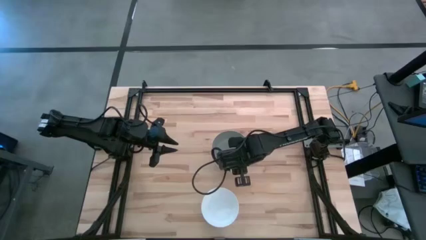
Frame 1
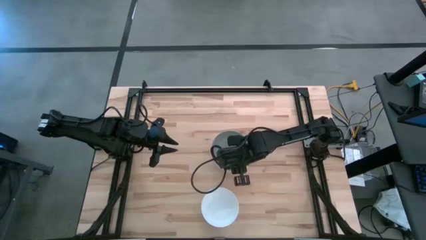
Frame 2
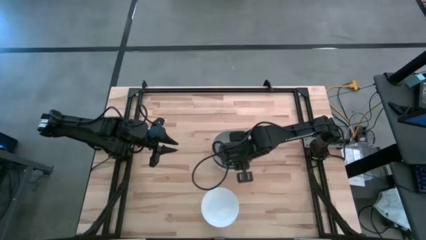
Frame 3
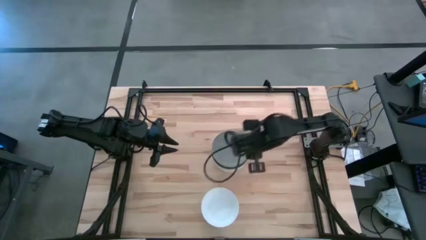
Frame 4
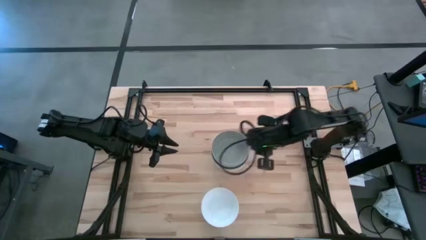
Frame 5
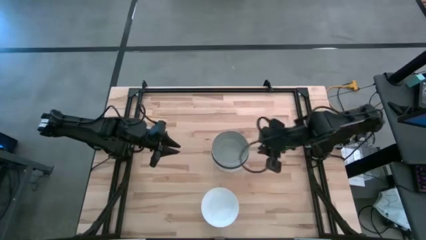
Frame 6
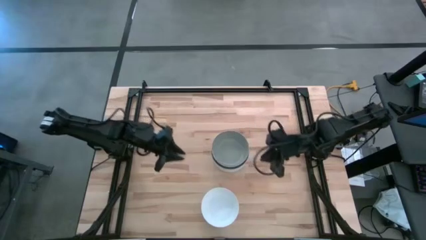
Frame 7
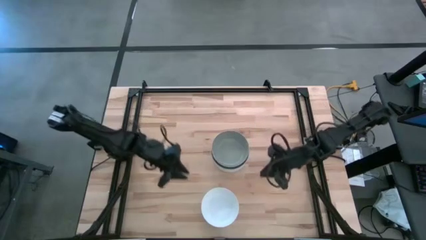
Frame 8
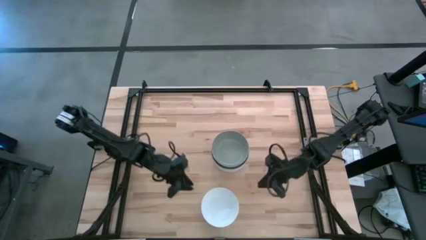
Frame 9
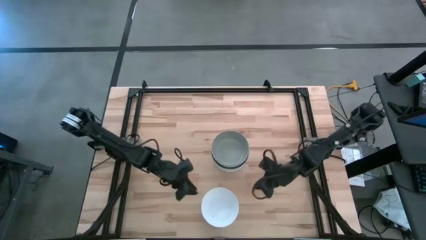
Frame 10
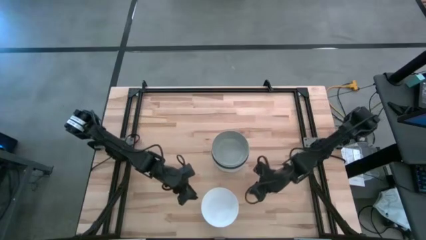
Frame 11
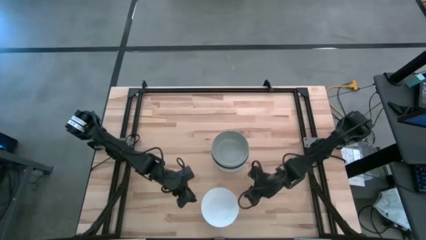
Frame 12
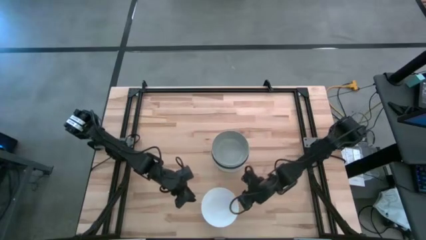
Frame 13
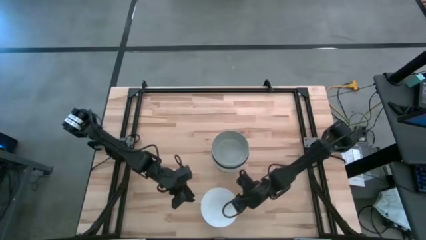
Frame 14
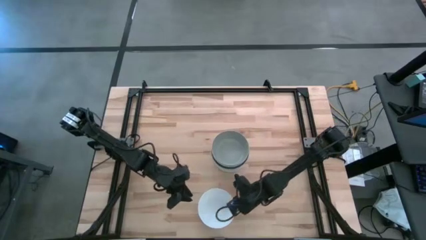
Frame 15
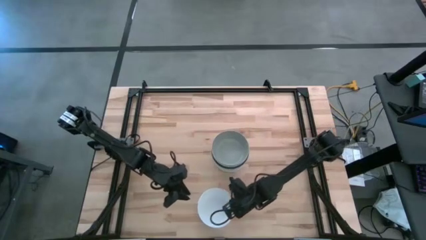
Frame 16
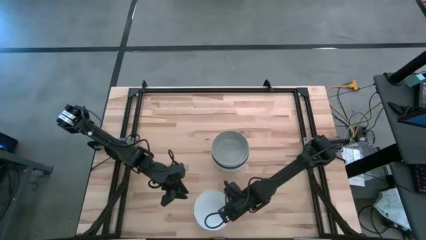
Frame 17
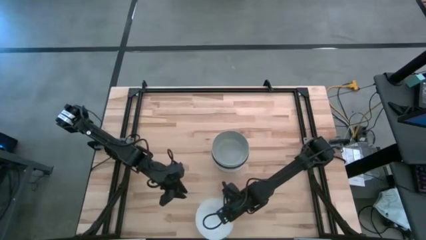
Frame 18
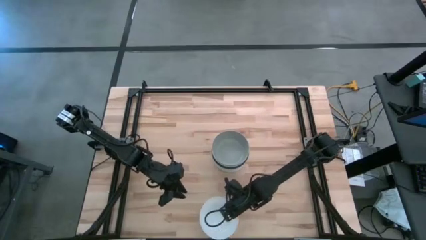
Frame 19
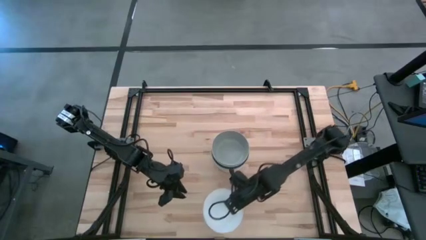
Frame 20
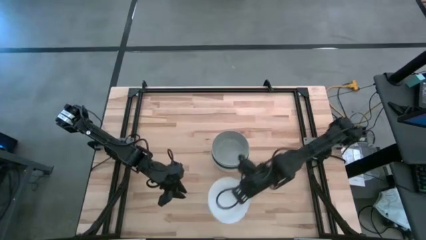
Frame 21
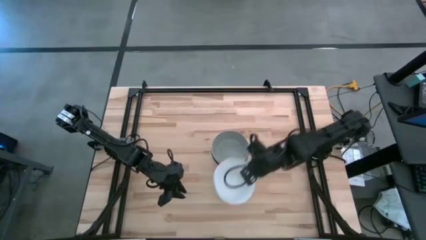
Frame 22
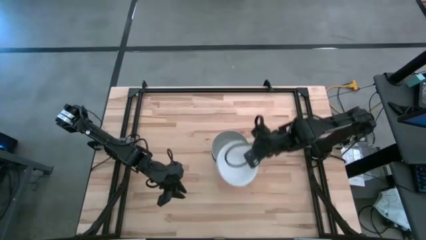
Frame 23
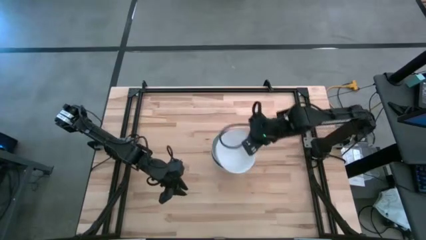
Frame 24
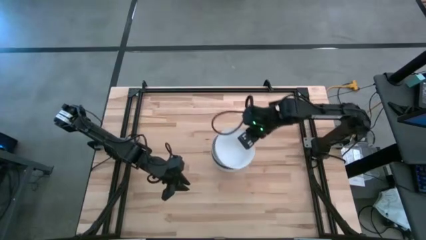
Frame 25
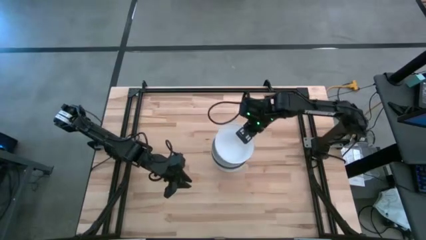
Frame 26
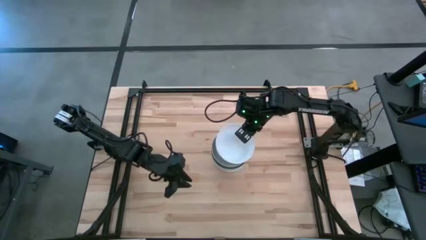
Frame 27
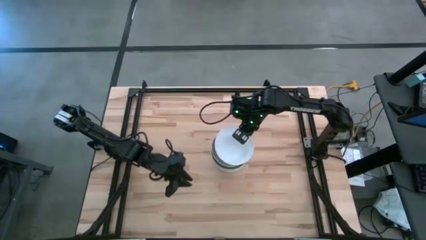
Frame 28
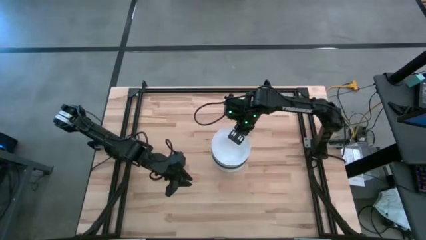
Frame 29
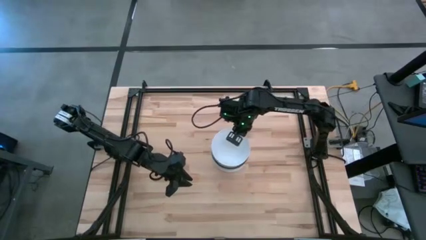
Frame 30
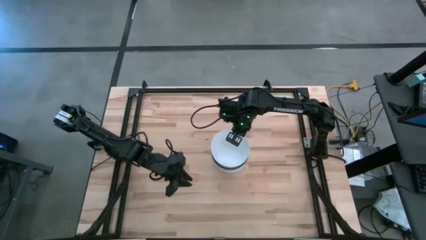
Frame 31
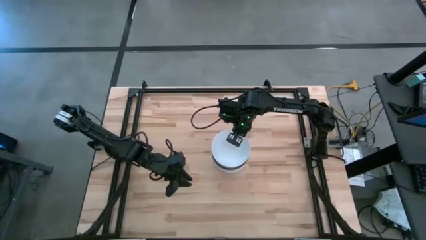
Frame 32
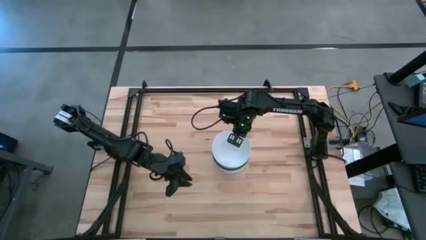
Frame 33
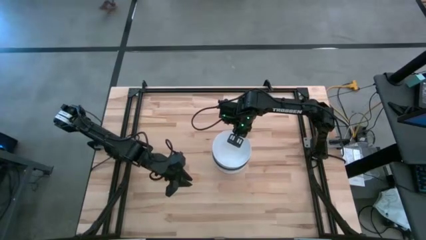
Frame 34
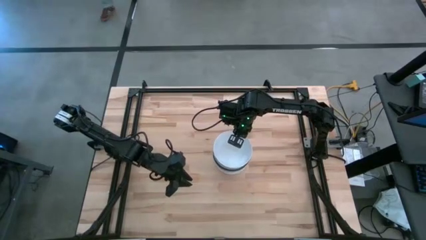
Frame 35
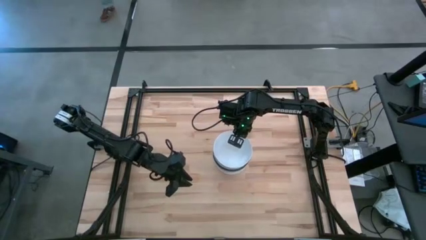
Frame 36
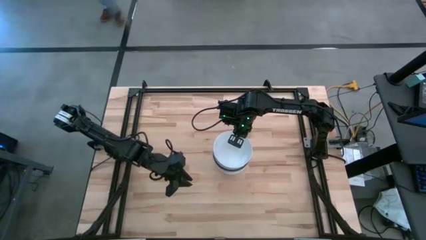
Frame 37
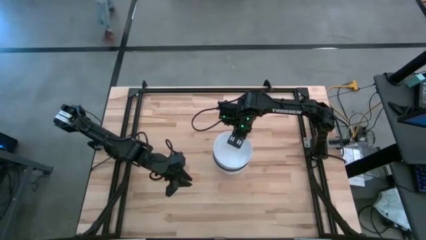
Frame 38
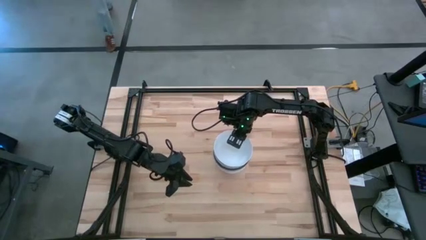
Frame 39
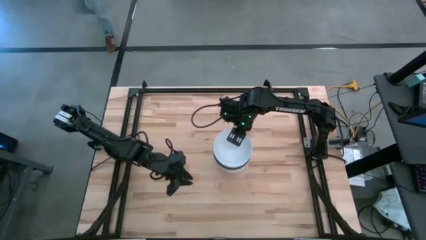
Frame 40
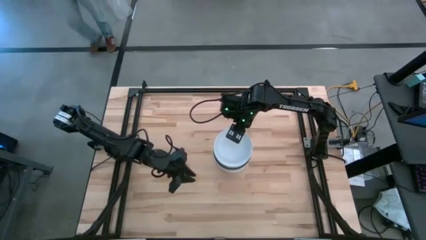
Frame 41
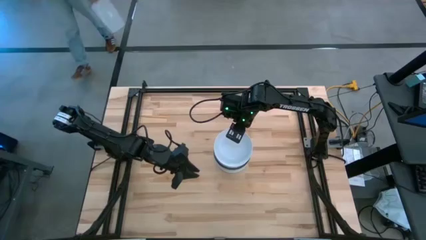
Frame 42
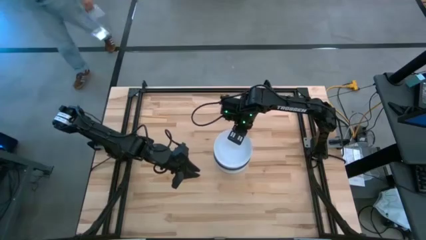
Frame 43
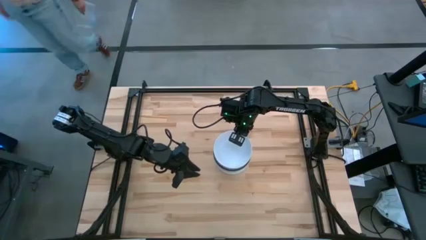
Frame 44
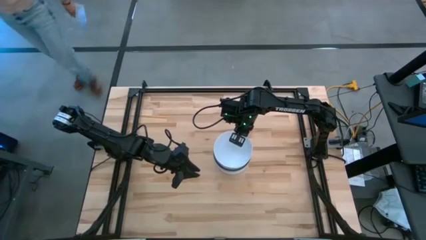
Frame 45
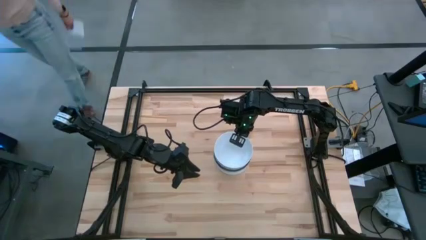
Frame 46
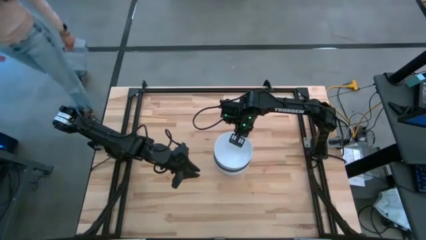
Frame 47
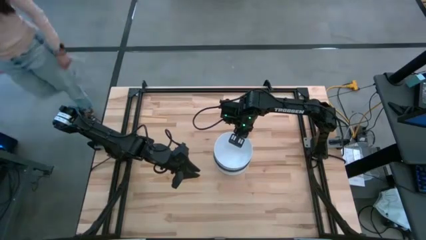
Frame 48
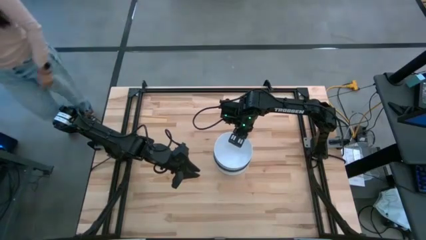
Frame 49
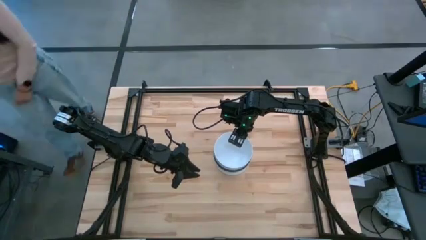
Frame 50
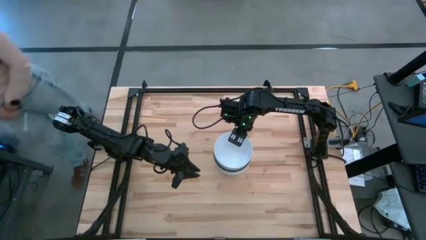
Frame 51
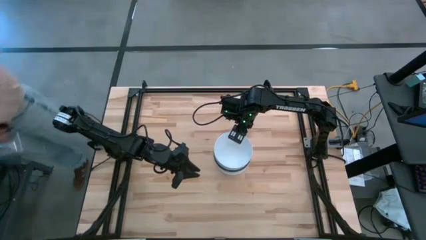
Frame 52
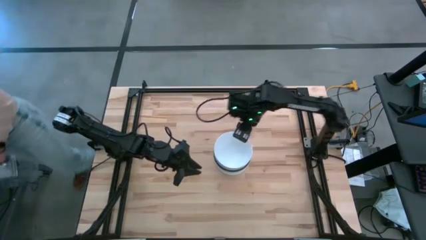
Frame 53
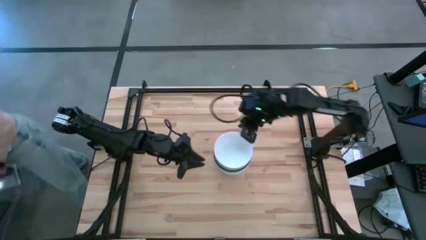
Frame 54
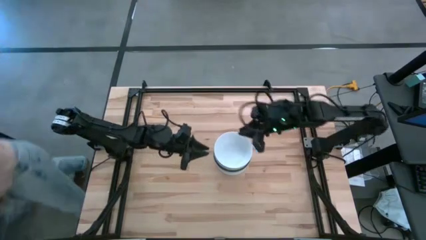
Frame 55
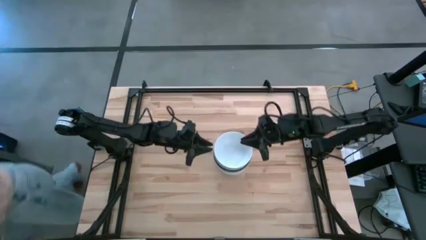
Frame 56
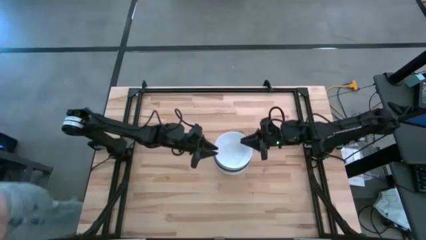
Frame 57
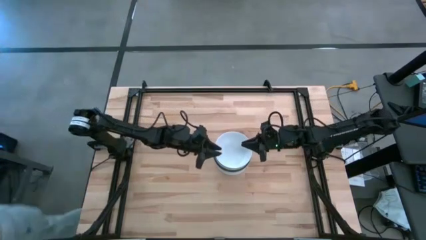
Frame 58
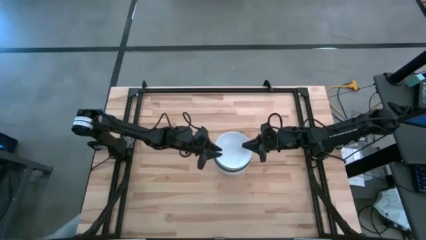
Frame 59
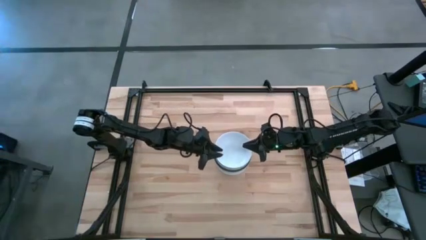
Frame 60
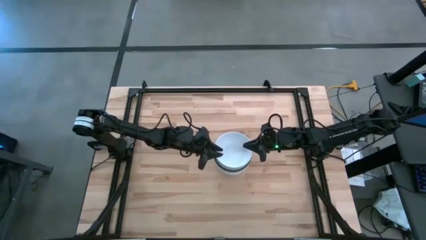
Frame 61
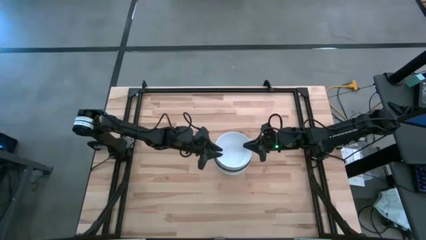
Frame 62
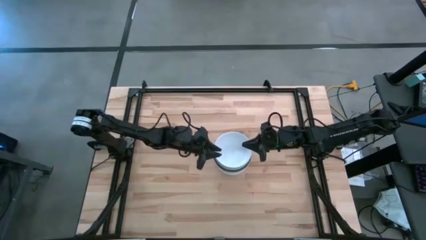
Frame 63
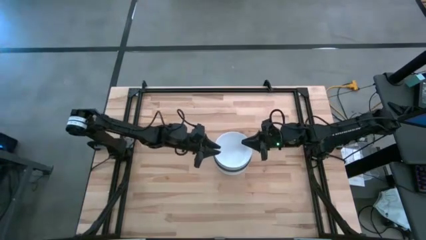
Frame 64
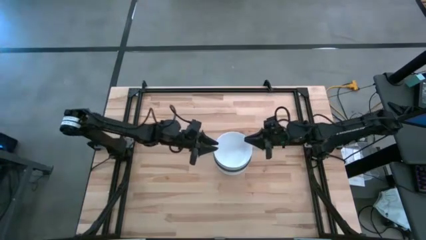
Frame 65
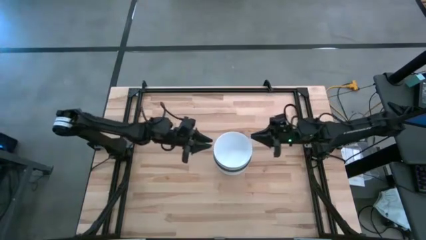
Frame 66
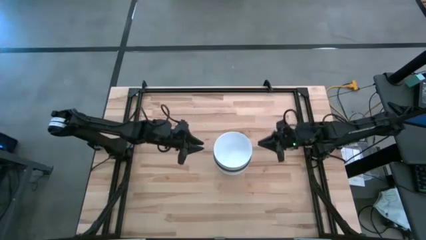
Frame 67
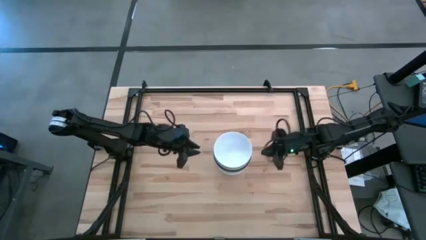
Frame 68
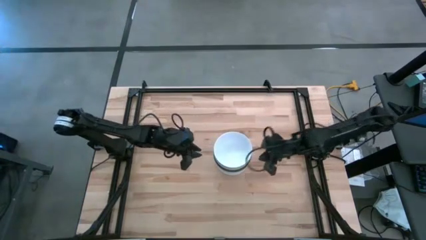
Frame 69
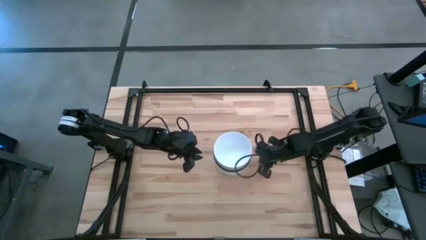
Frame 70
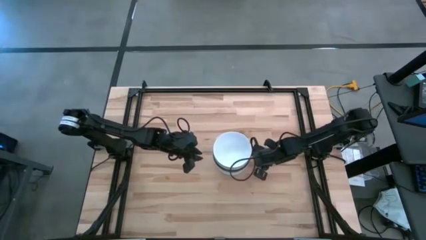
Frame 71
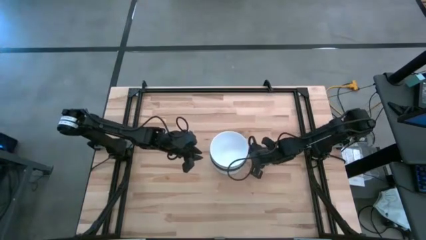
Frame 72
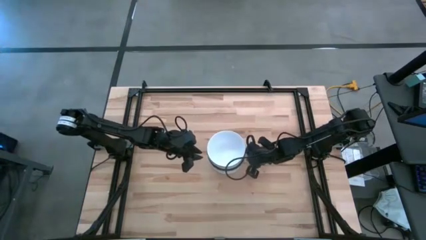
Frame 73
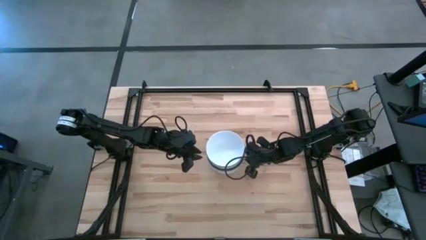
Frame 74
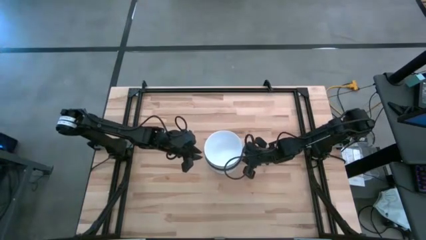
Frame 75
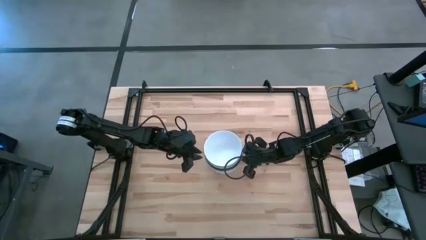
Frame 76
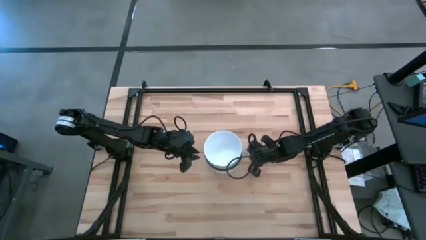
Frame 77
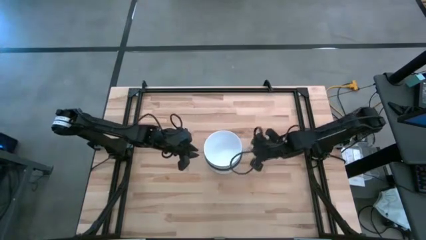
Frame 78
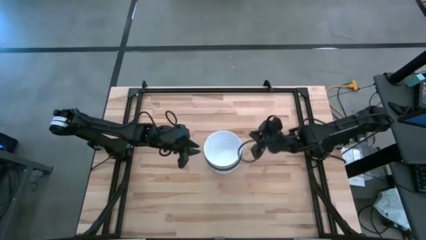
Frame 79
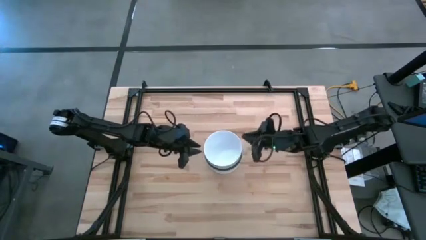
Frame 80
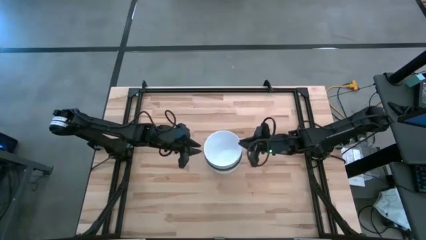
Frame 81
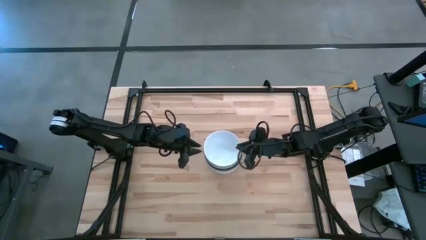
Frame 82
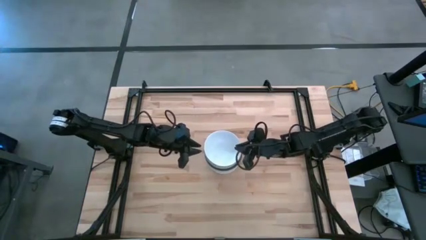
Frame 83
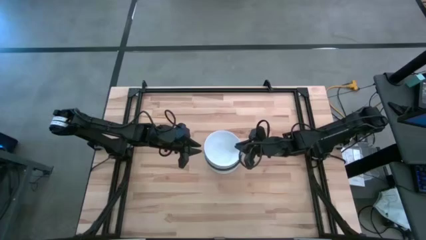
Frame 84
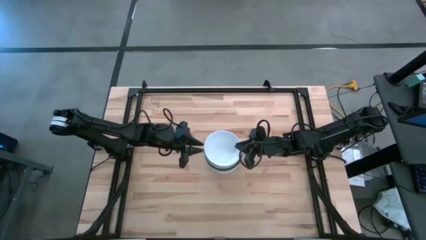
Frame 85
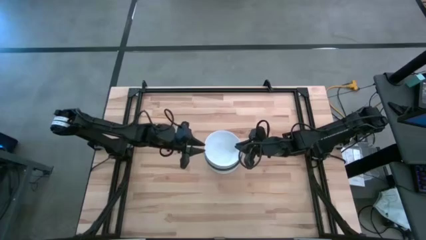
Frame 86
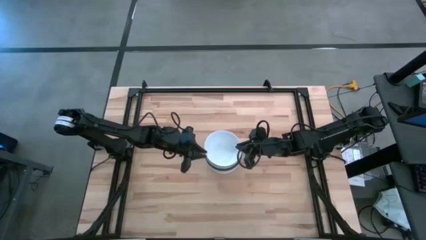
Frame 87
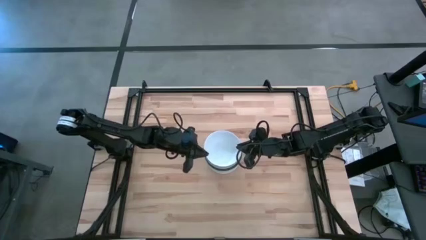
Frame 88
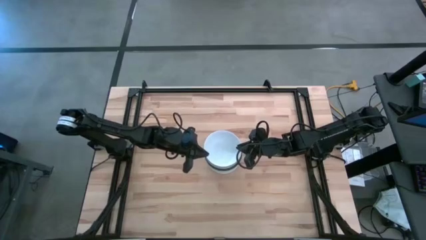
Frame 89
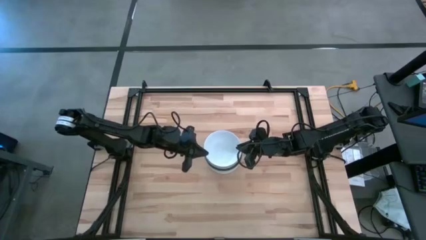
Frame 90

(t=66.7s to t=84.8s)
Task: Nest bowls inside each other
Stack the white bowl on the gray bowl
